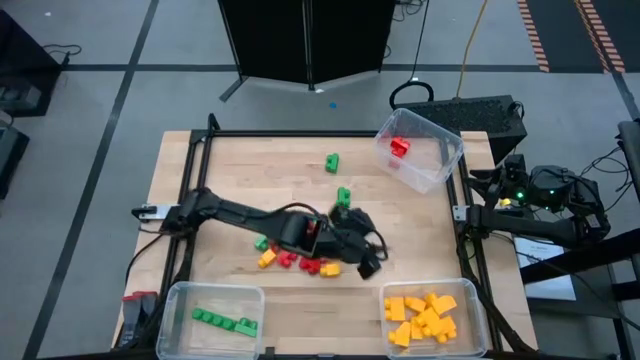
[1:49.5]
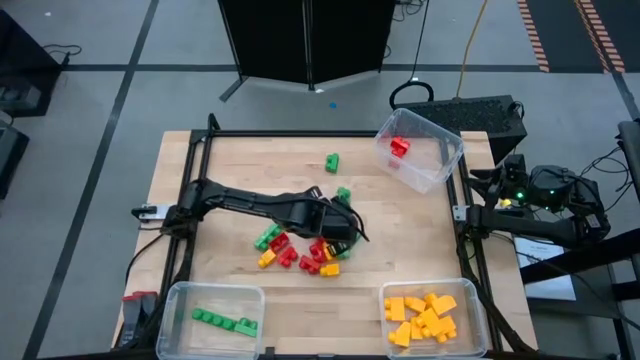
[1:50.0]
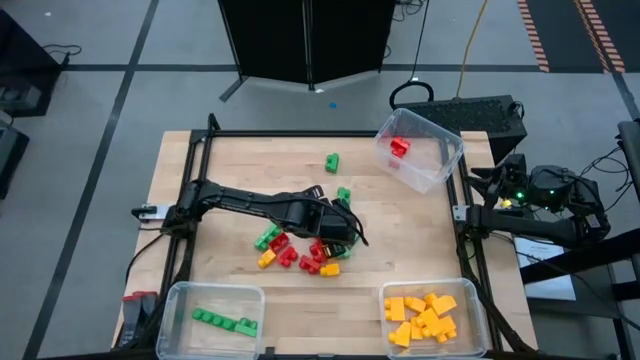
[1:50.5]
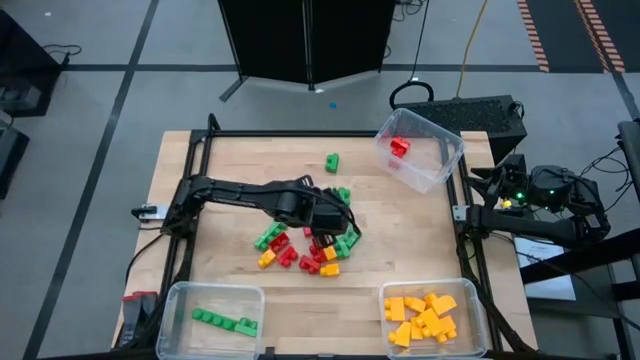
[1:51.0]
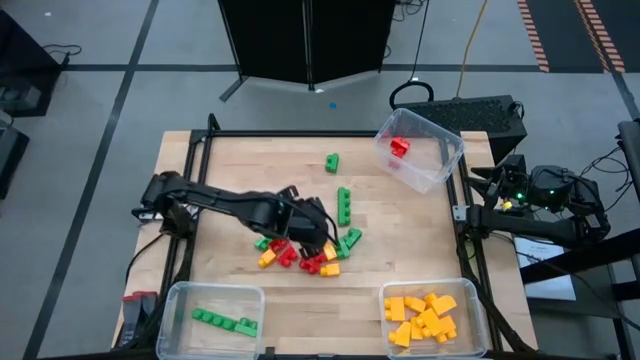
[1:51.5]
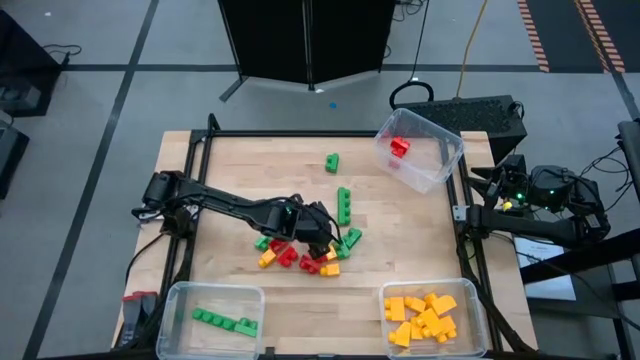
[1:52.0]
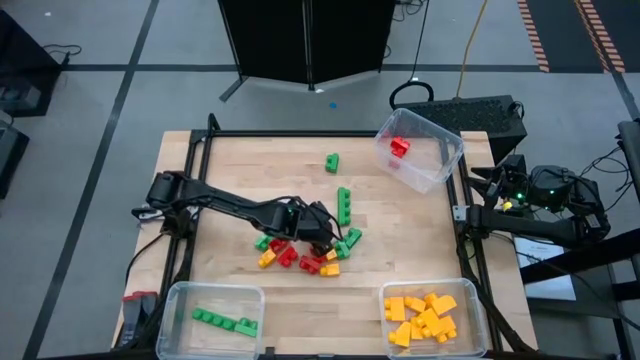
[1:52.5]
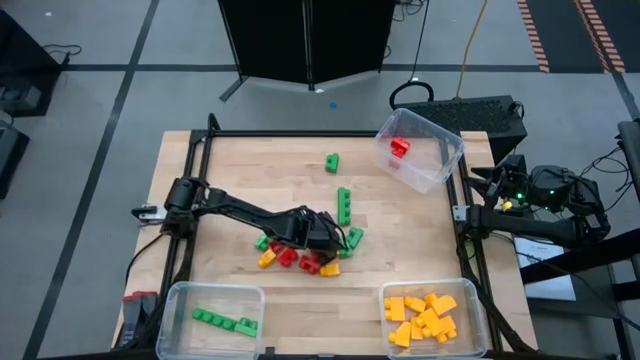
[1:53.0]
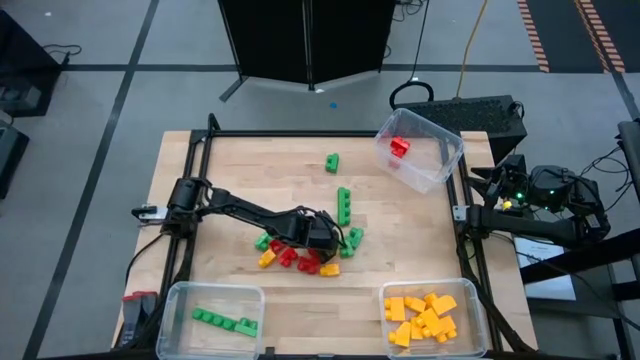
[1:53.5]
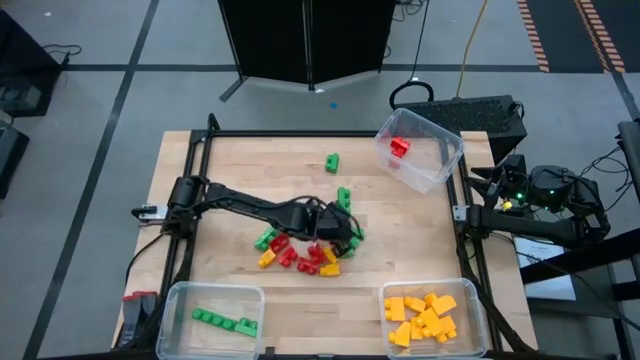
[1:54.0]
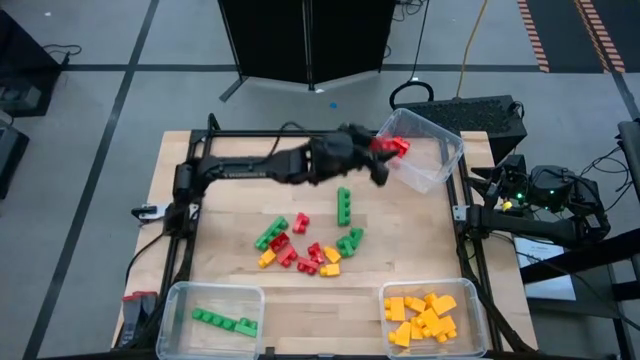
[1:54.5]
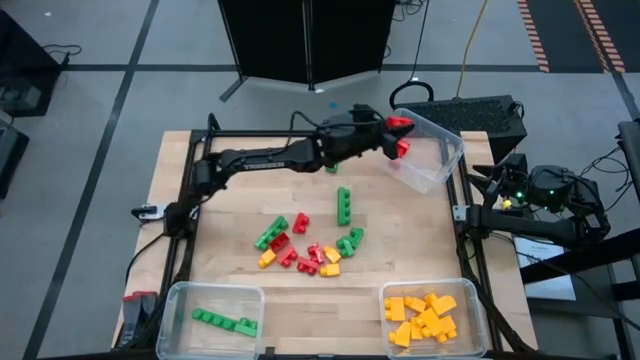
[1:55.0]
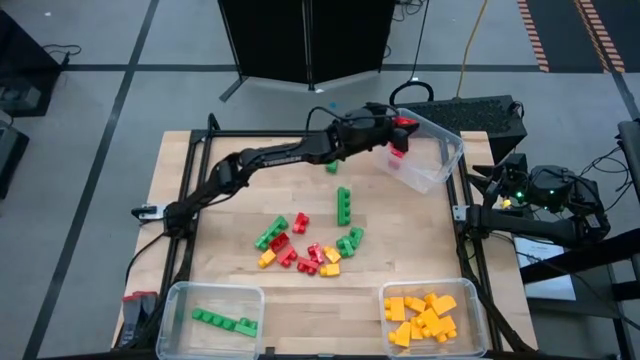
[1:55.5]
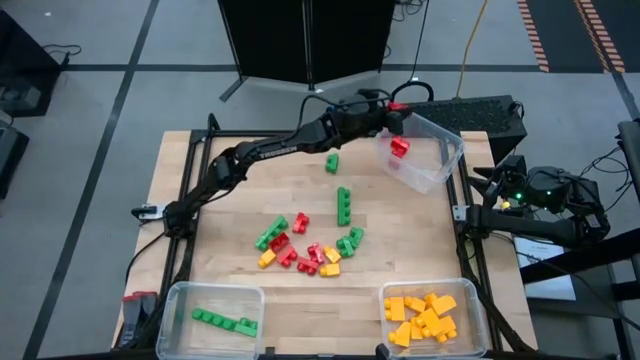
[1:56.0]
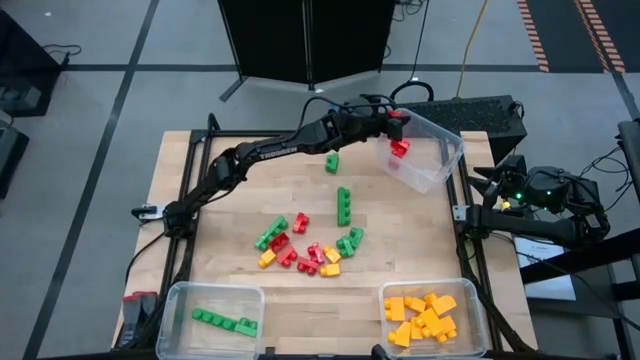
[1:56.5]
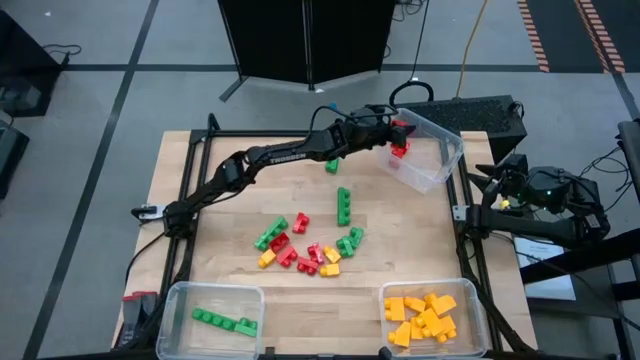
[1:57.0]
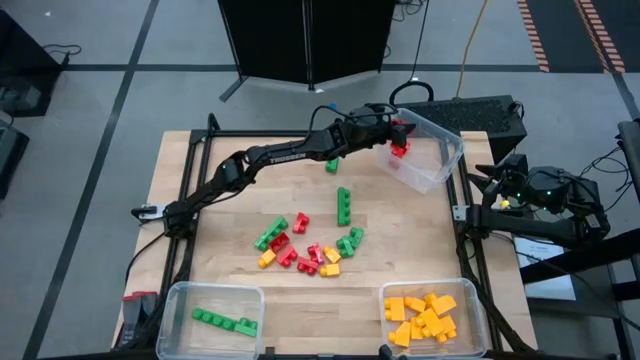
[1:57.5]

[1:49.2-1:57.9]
Task: Sort blocks
Put the red game piece into the top transparent bin

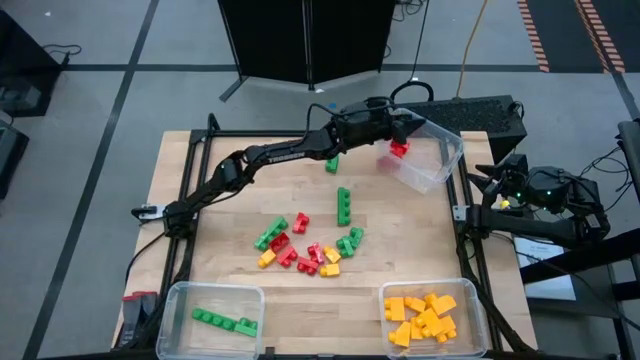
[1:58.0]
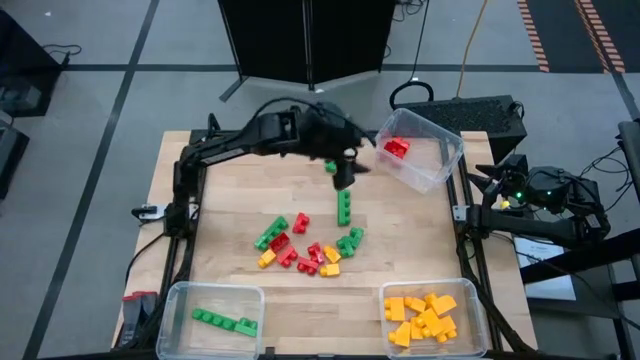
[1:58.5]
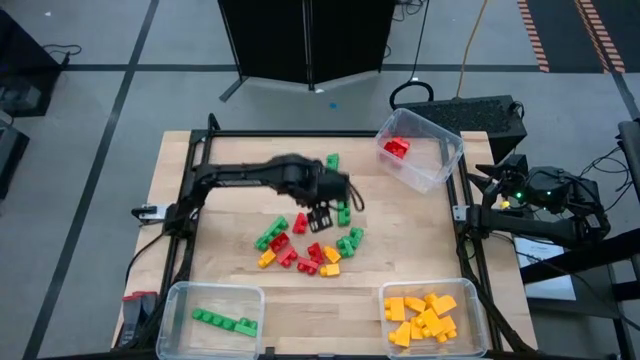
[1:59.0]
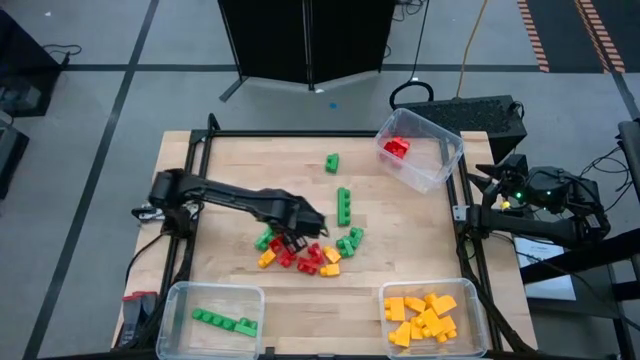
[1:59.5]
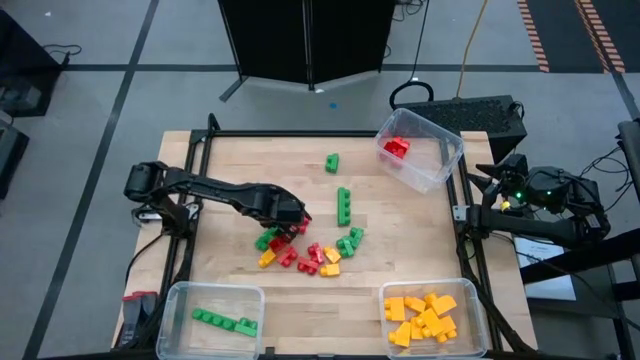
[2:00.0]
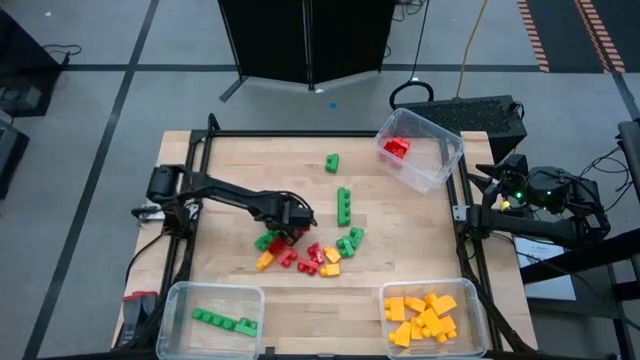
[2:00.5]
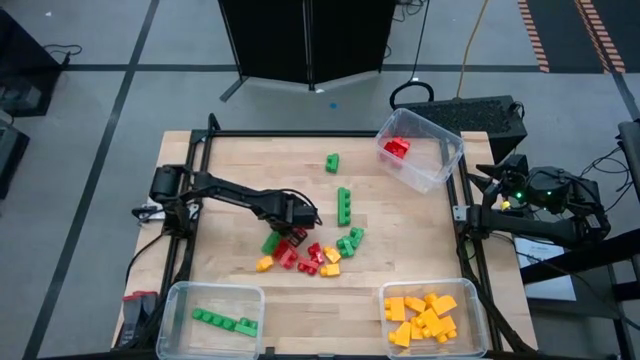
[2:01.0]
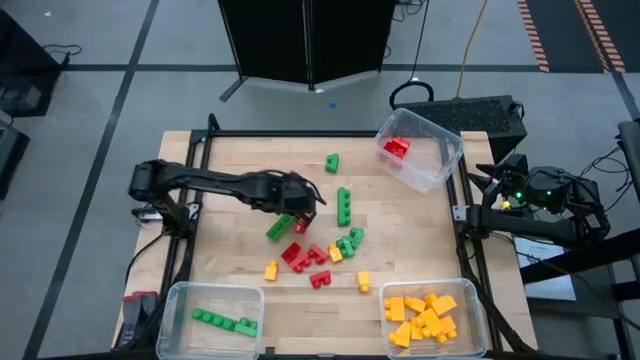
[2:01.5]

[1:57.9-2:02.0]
Put the green game piece into the bottom left transparent bin

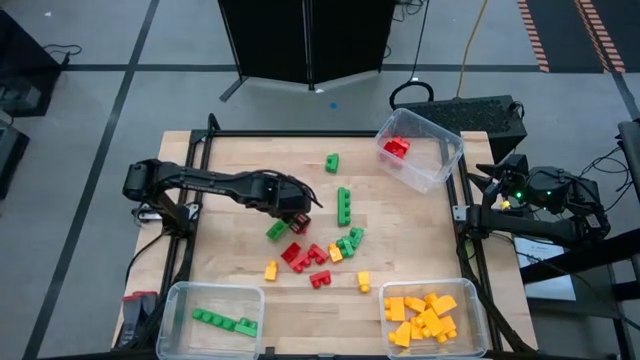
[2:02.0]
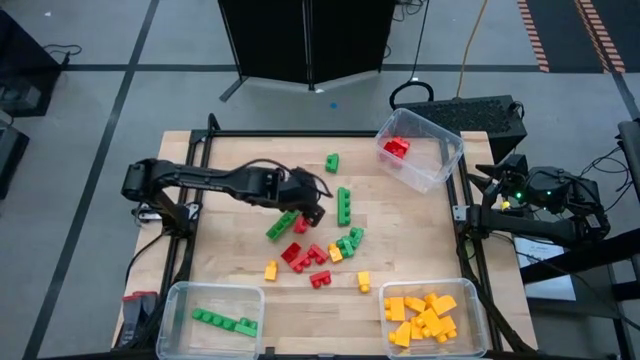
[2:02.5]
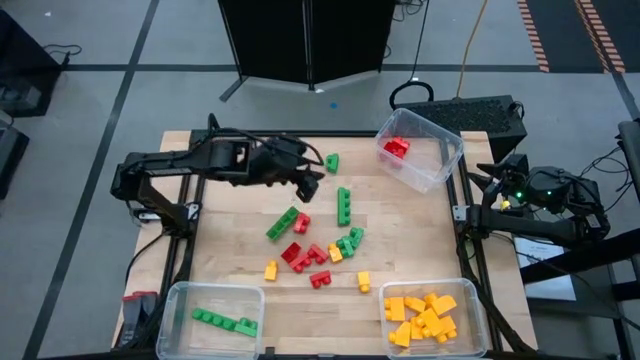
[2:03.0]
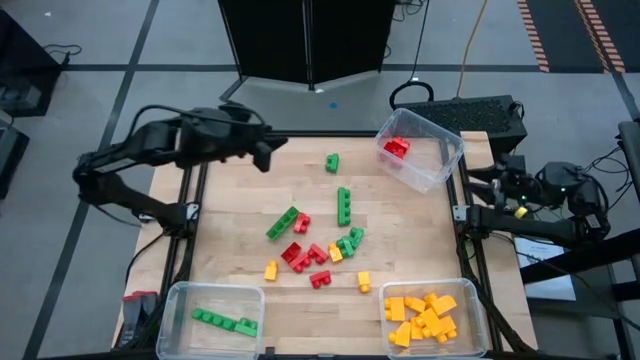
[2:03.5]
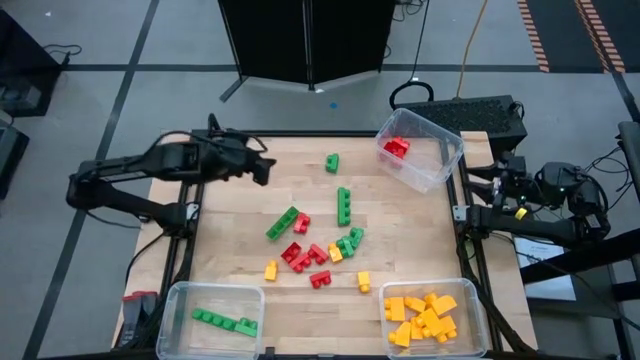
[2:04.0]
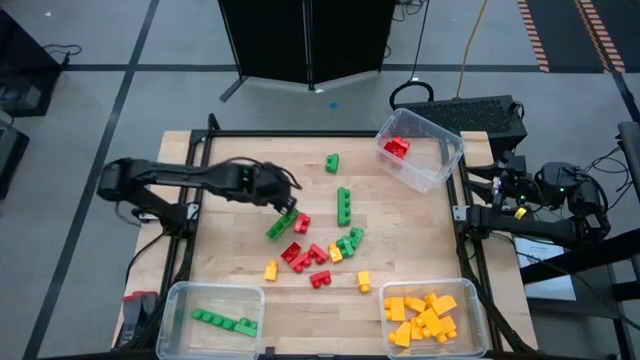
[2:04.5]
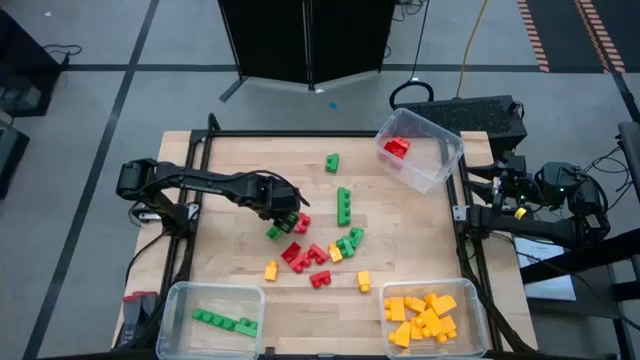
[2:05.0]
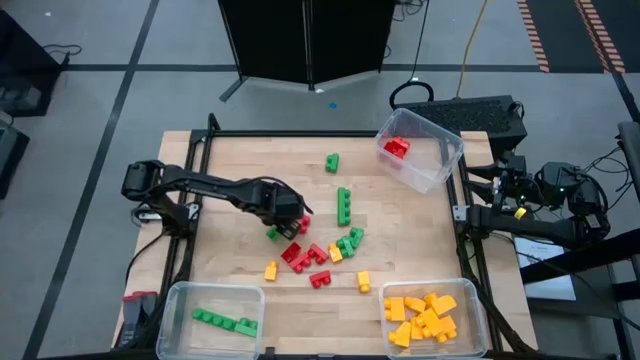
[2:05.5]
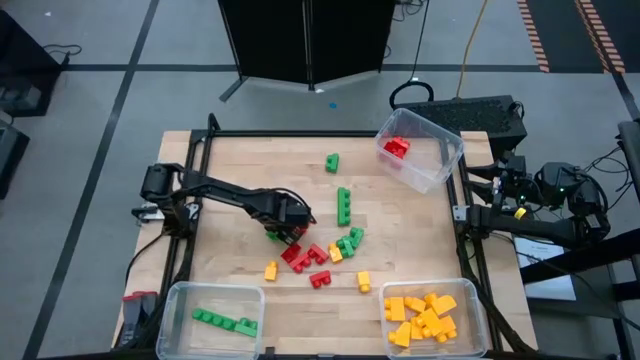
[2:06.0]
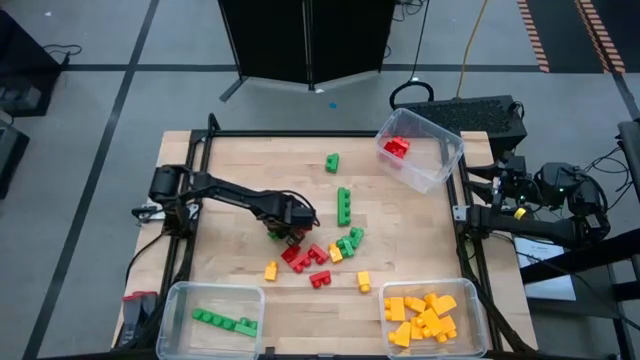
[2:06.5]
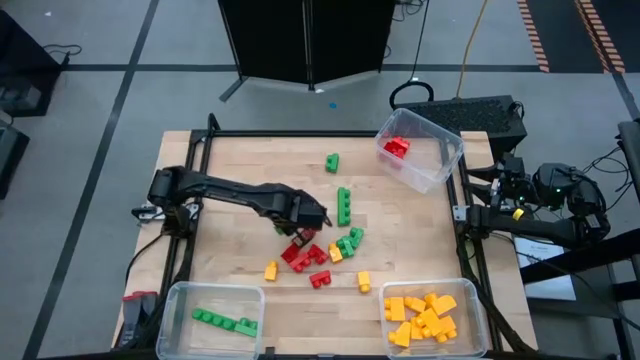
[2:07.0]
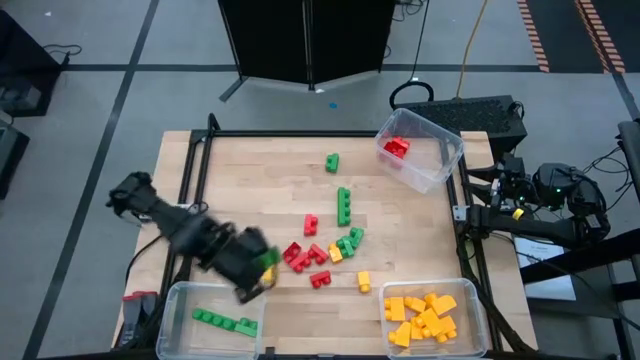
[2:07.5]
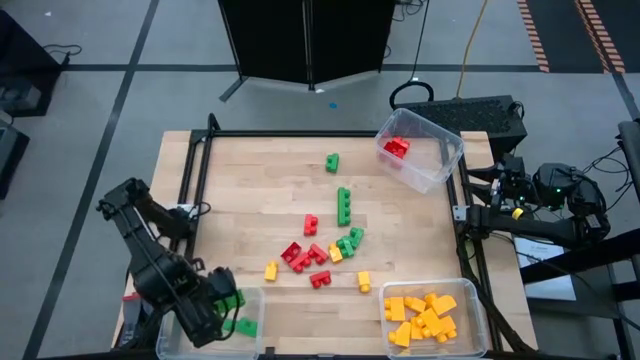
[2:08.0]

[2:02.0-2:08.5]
Put the green game piece into the bottom left transparent bin

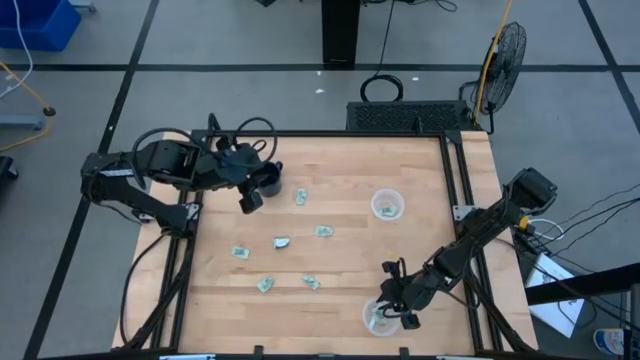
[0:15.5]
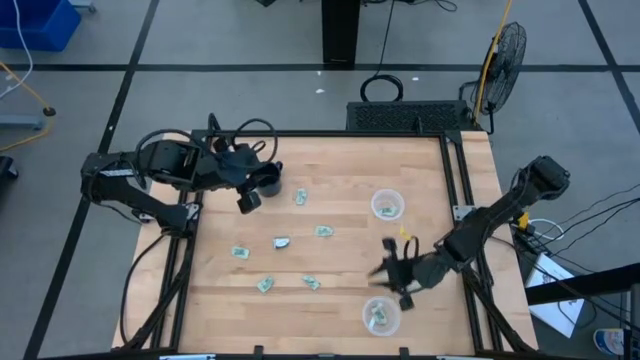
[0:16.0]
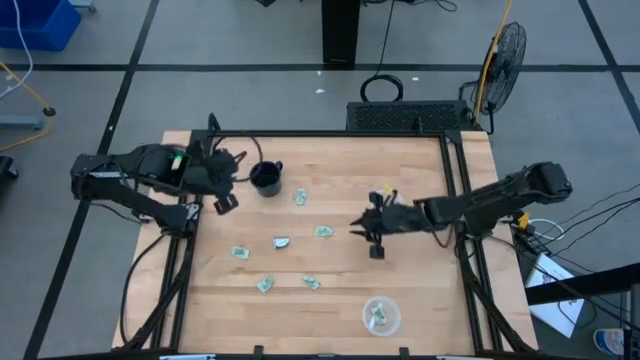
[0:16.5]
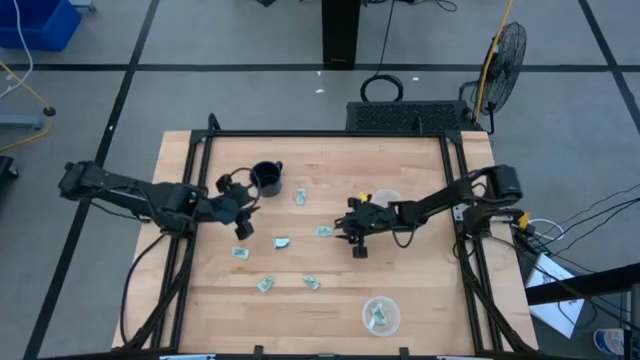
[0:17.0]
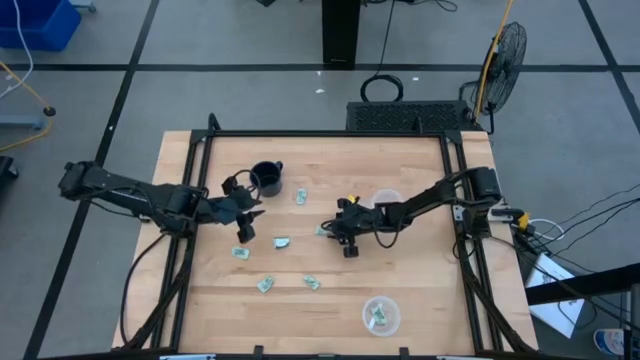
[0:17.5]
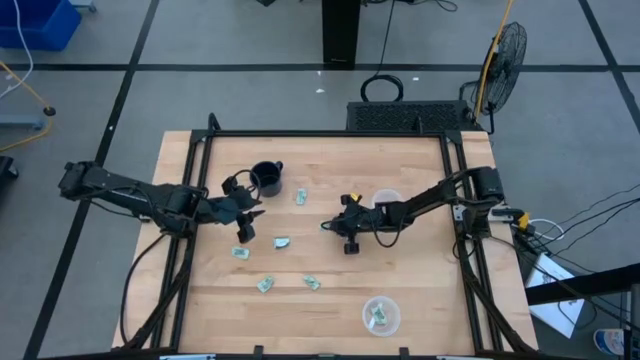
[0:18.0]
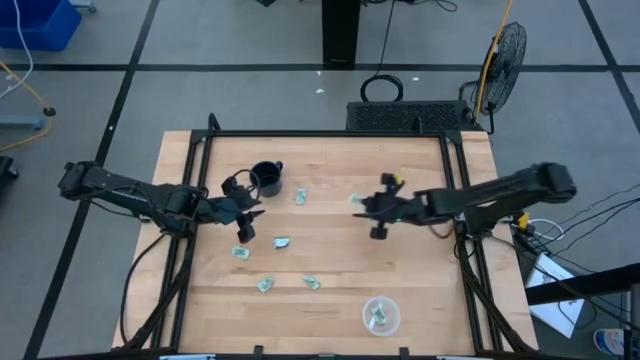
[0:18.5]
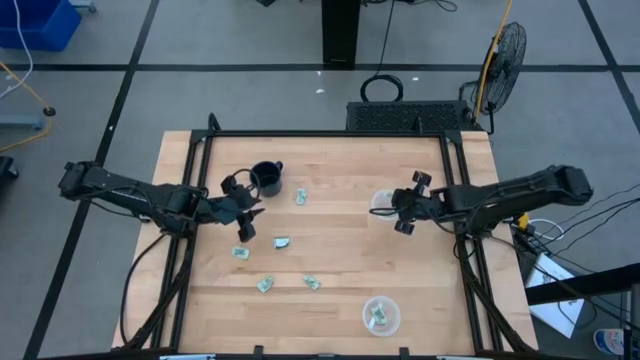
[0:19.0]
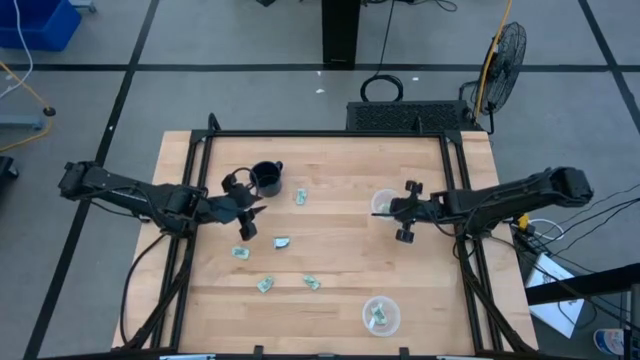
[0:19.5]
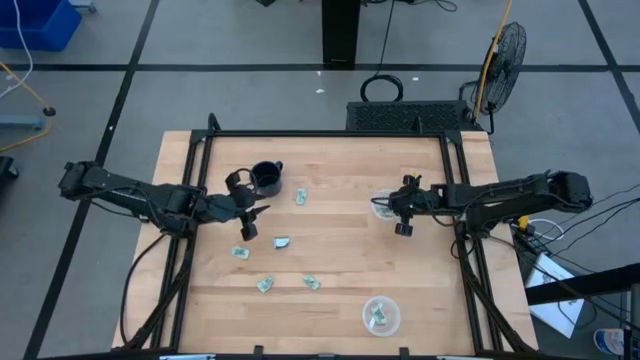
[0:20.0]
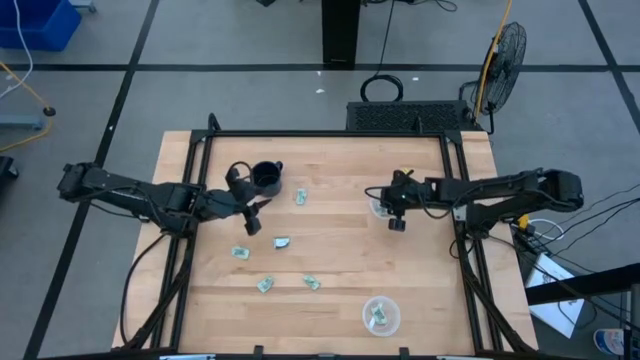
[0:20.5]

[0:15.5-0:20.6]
Task: Pick and place Stevia / Truvia into bins
Put the light green stevia packet into the top transparent container
